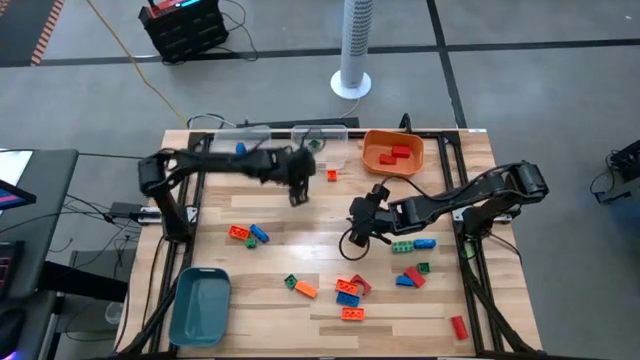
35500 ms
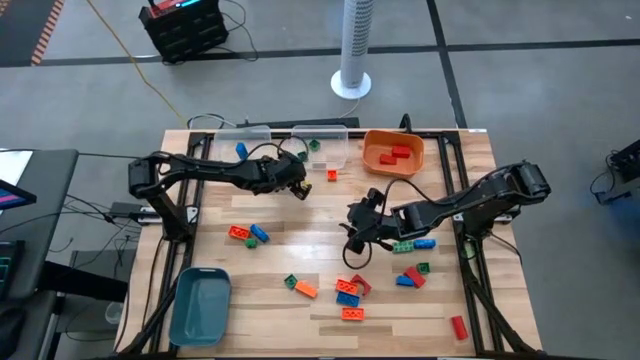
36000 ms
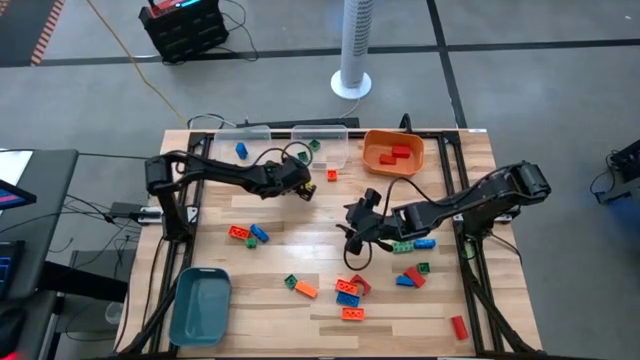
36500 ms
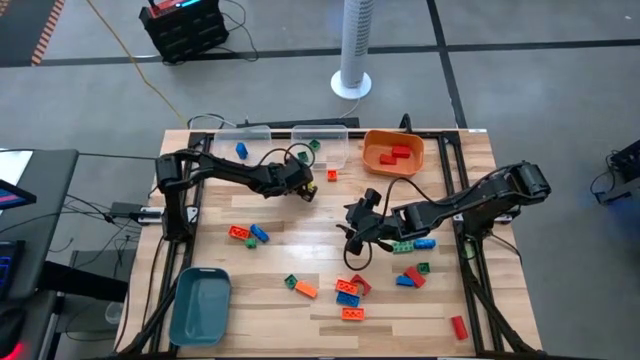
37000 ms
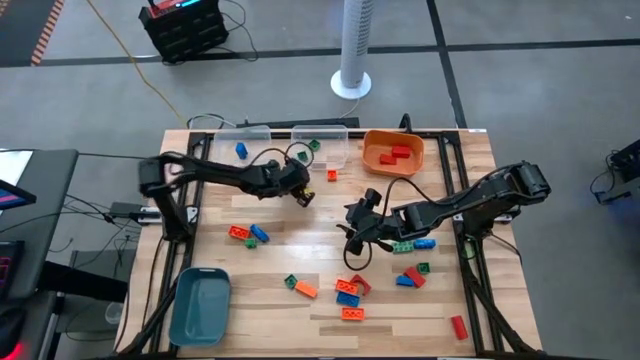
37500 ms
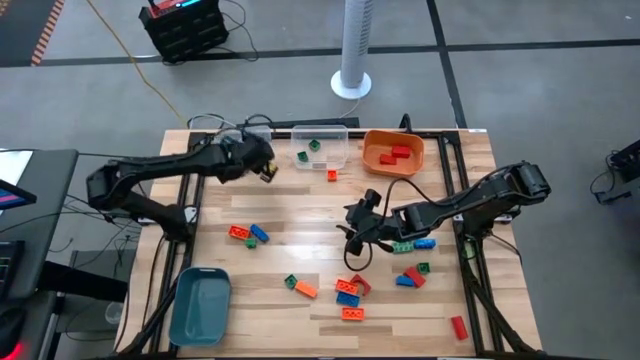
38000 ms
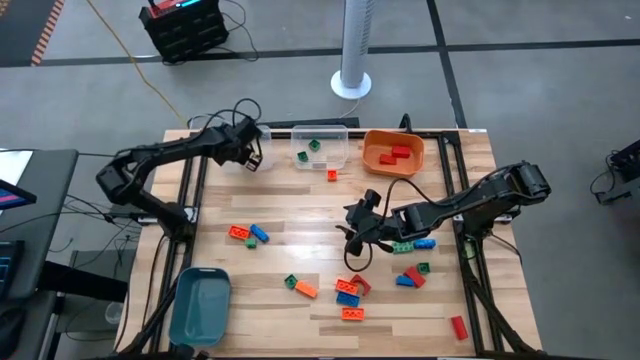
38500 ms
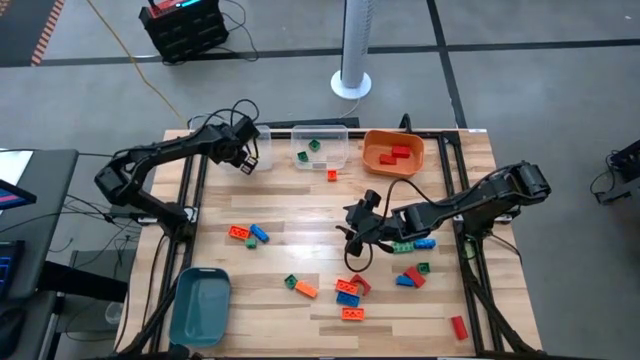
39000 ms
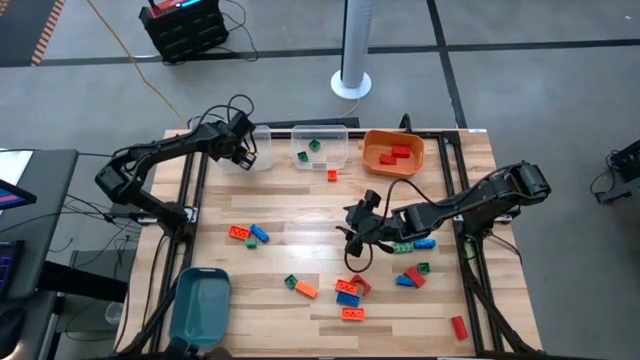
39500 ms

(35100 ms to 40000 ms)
Task: Sort blocks
Put the blue game piece into the left transparent bin

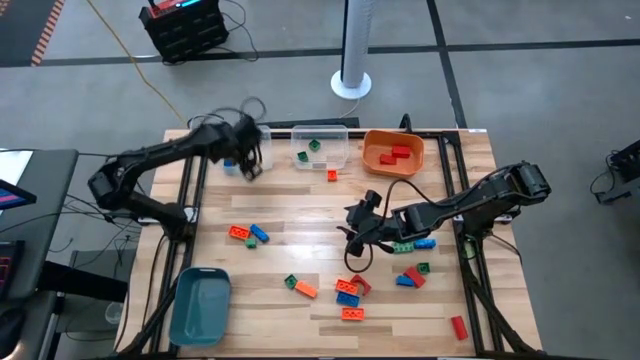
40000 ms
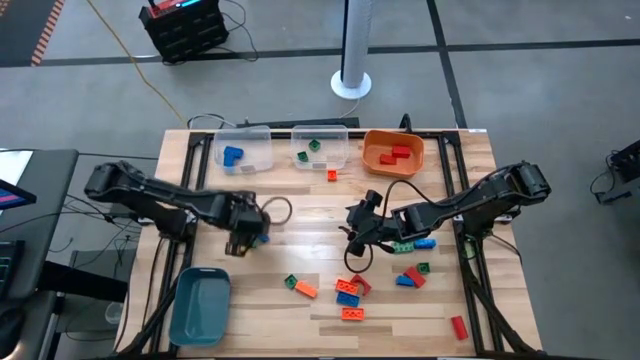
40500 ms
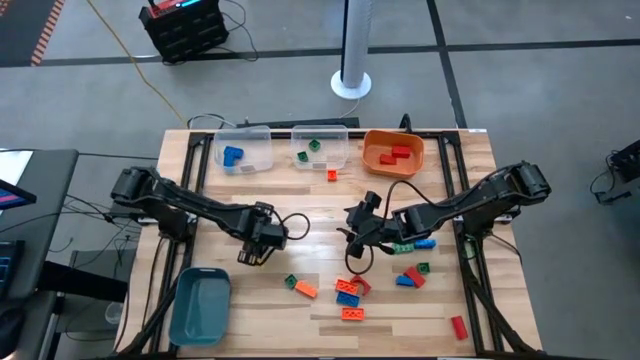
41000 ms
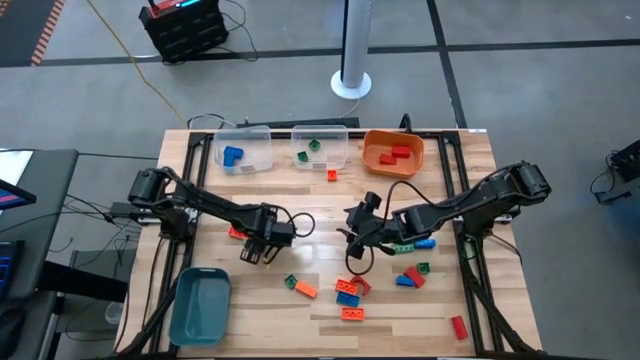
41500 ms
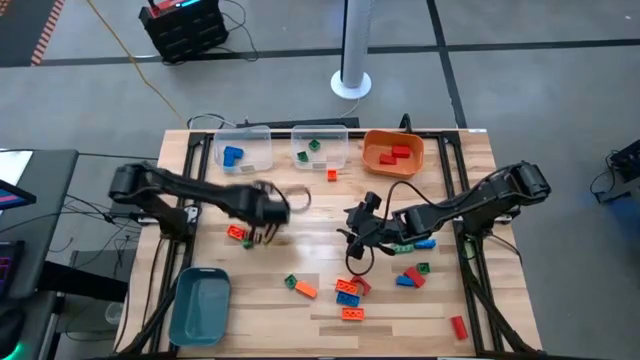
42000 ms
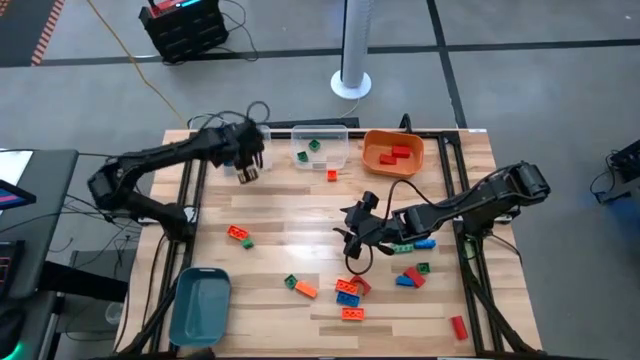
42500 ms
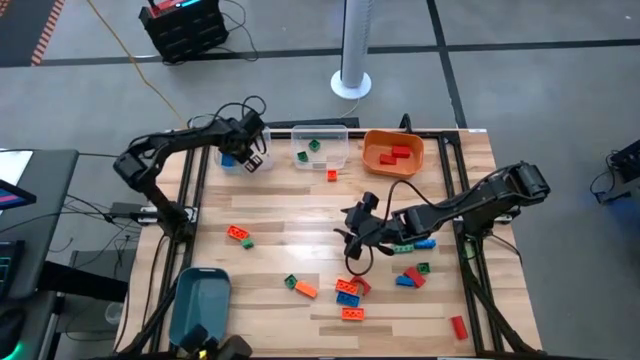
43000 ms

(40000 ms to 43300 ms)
Put the blue game piece into the left transparent bin

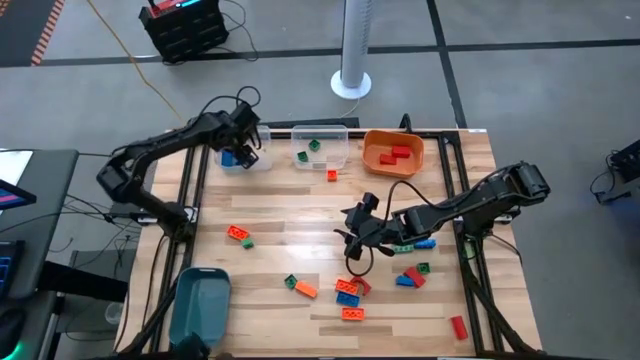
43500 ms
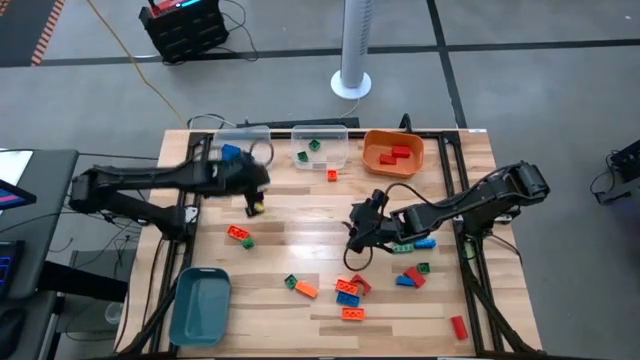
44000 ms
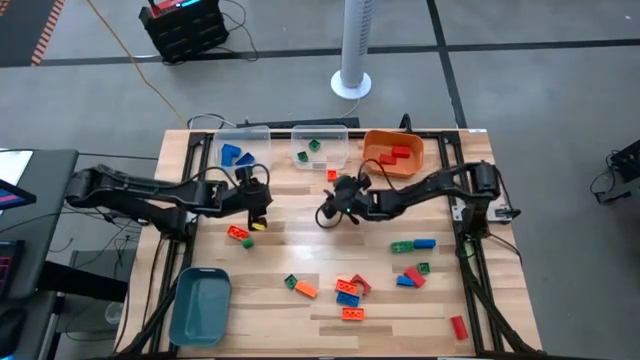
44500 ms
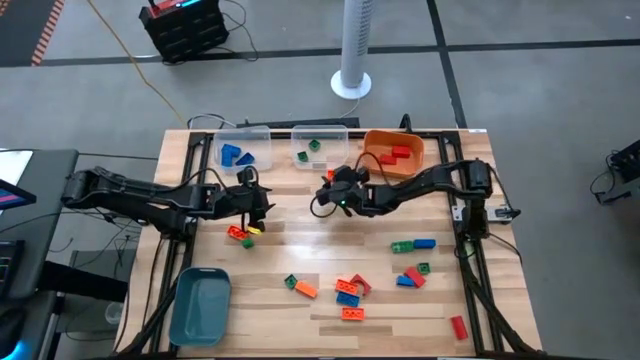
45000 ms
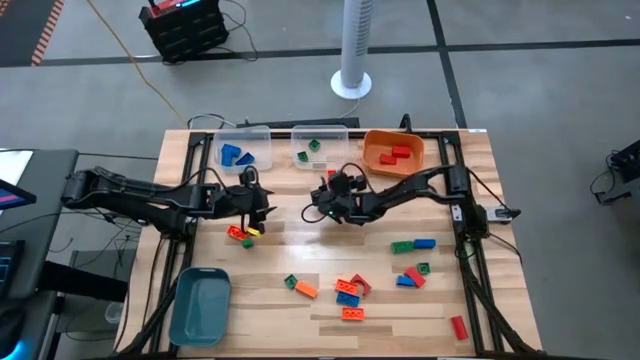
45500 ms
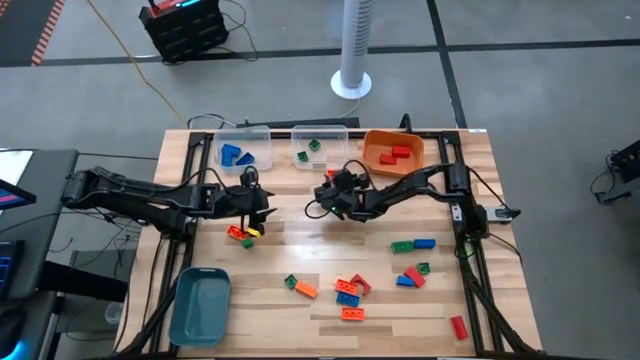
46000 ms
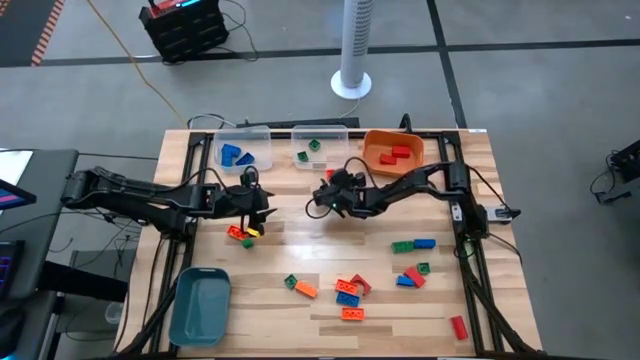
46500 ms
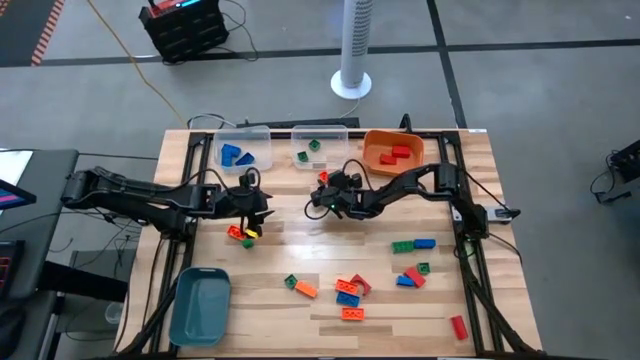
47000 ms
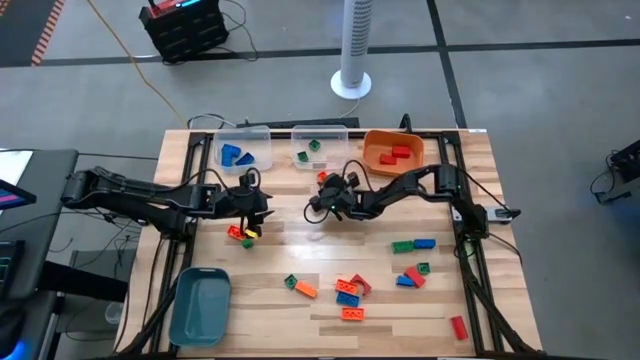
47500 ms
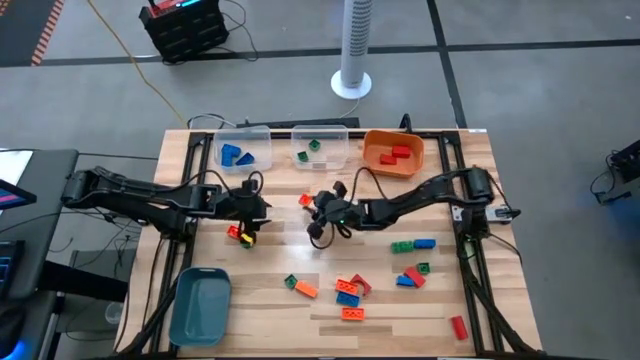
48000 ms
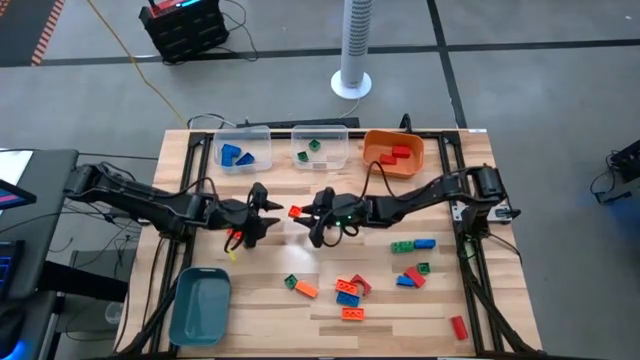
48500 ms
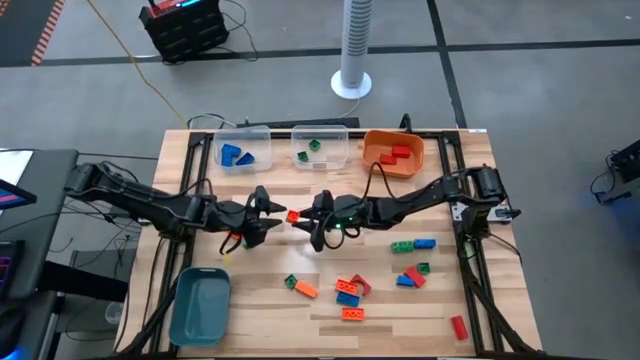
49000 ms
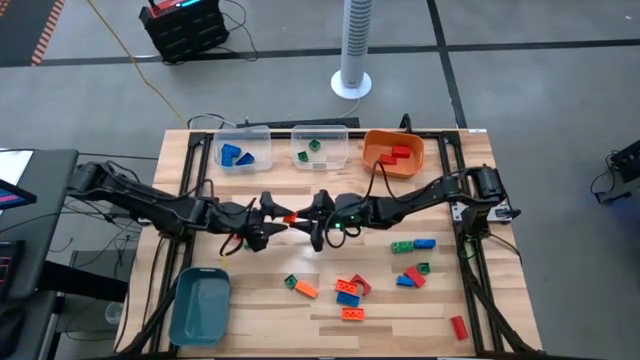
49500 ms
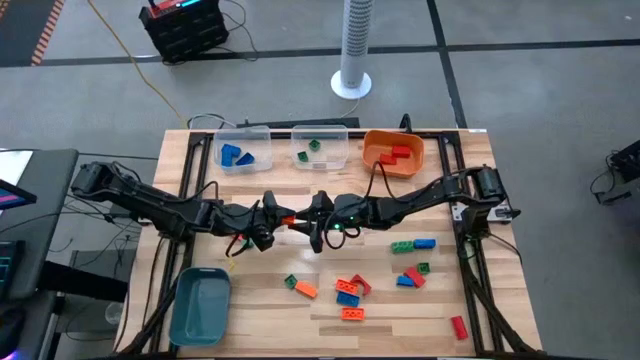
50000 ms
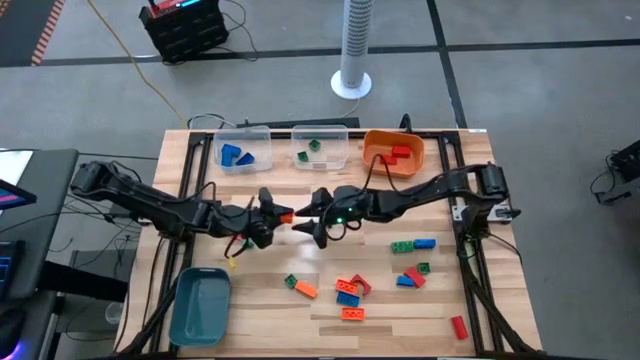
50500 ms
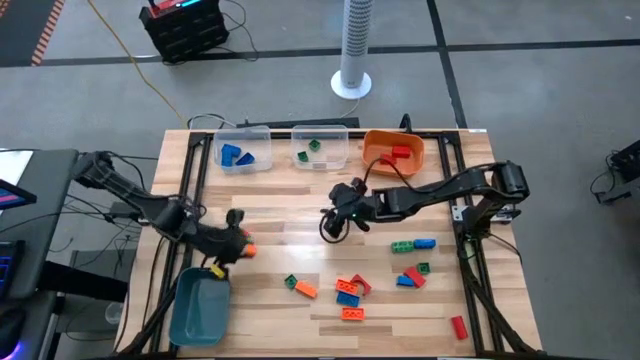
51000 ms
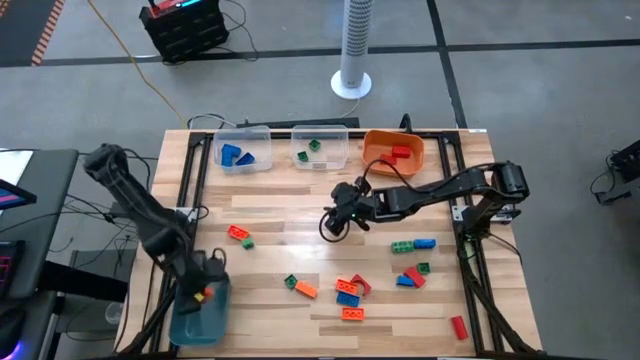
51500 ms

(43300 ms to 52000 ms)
Put the orange game piece into the blue bin

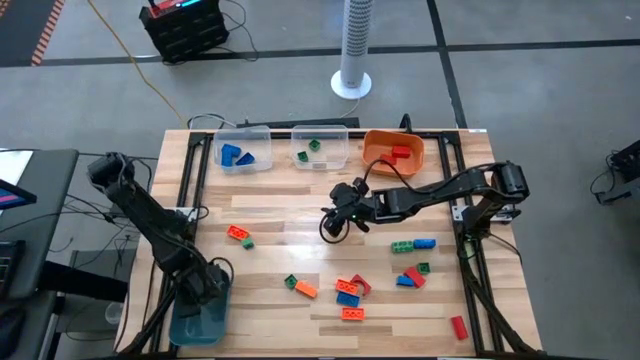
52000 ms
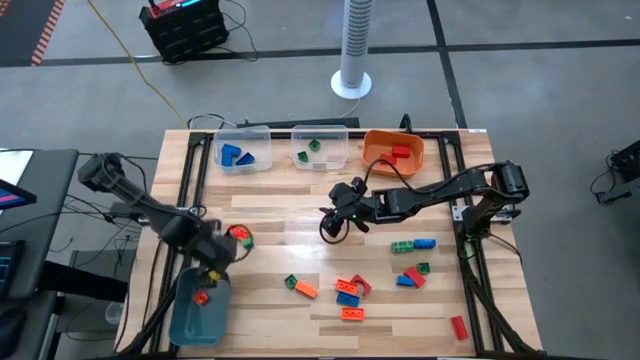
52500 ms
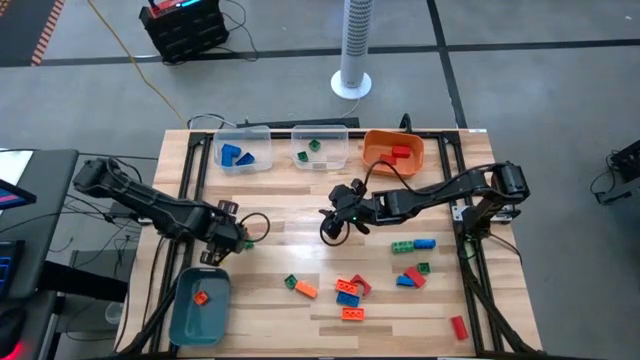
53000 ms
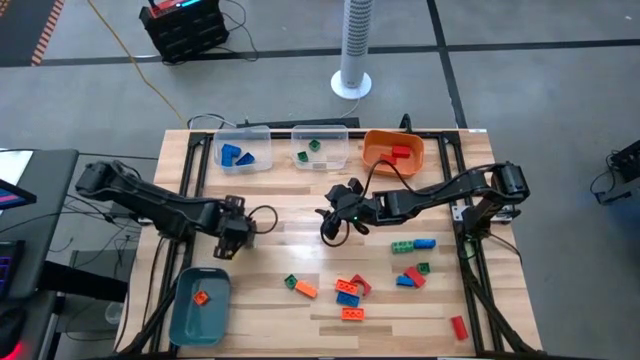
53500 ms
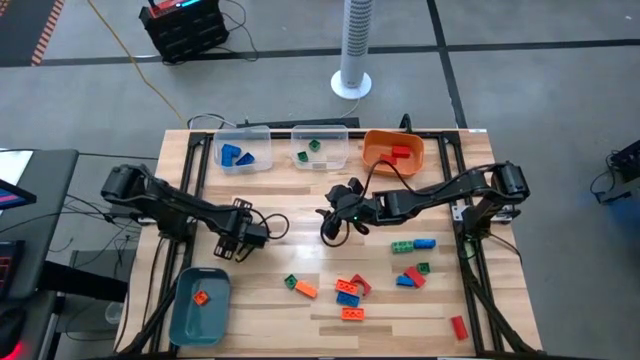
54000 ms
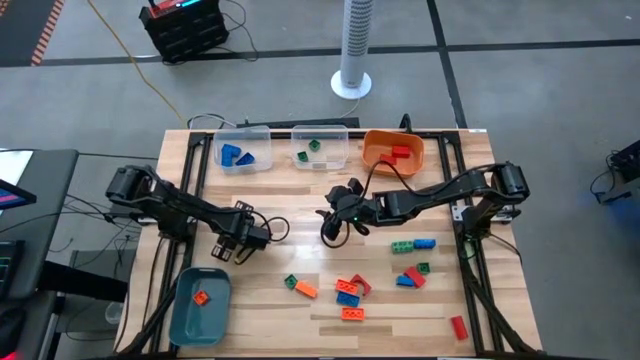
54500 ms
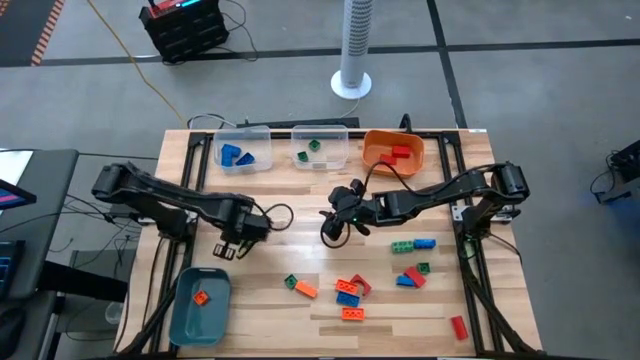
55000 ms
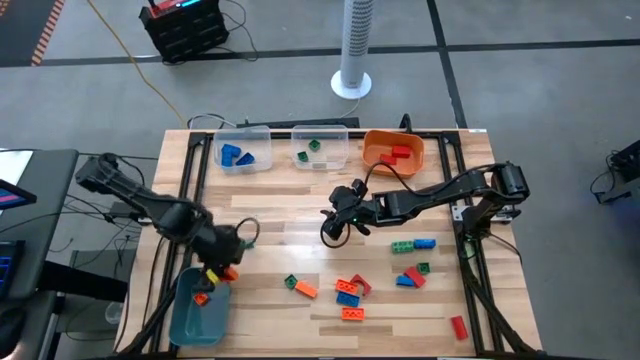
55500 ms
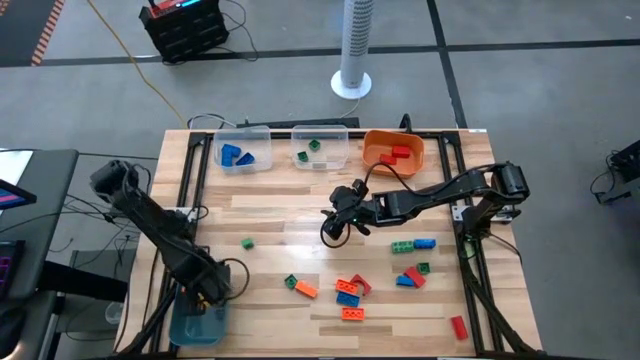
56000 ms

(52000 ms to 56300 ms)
Put the orange game piece into the blue bin
